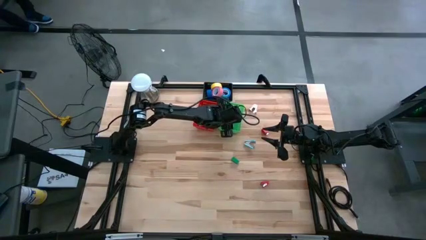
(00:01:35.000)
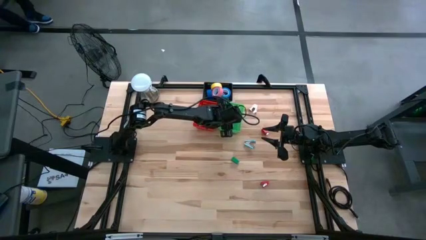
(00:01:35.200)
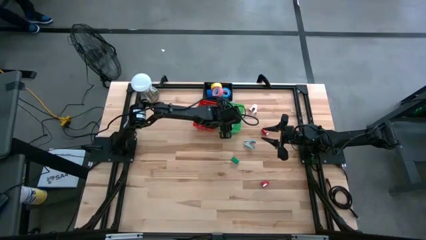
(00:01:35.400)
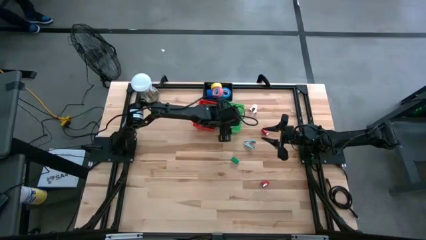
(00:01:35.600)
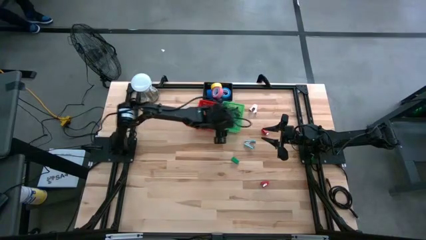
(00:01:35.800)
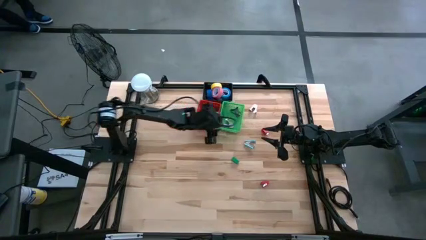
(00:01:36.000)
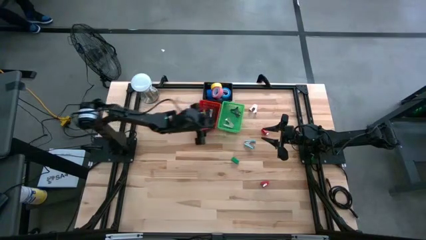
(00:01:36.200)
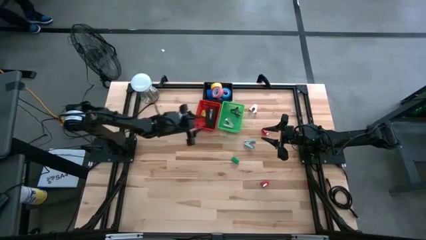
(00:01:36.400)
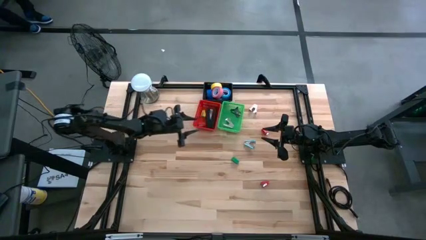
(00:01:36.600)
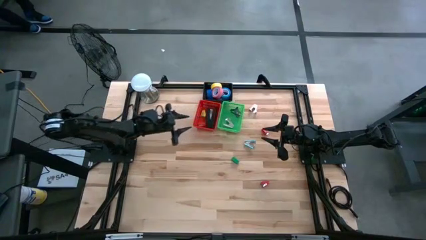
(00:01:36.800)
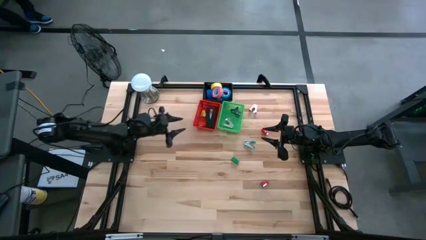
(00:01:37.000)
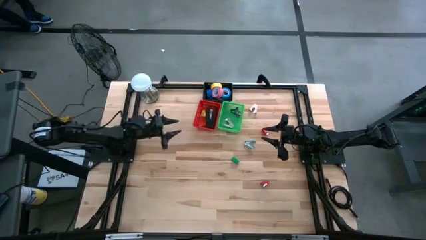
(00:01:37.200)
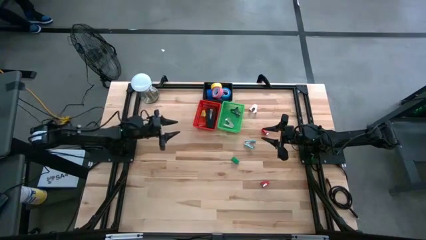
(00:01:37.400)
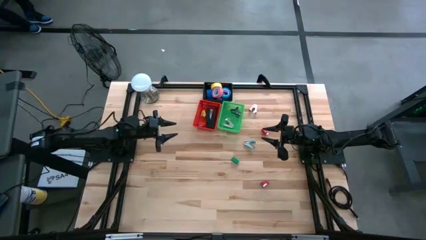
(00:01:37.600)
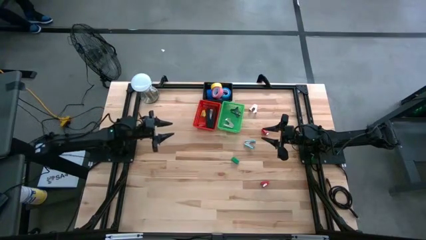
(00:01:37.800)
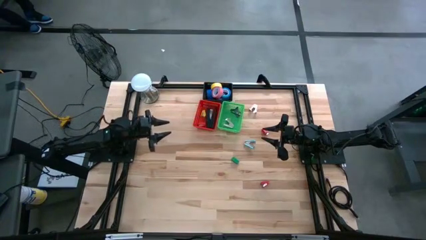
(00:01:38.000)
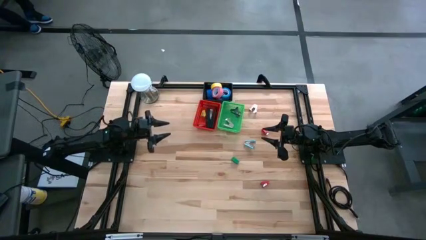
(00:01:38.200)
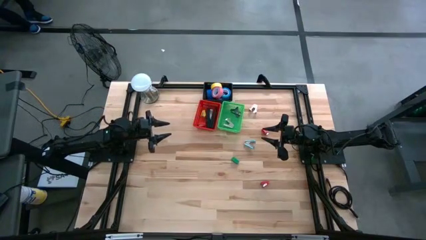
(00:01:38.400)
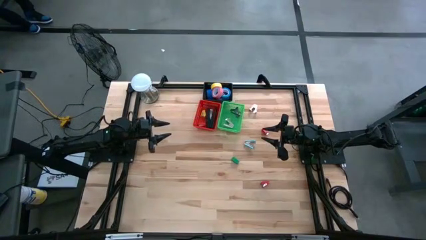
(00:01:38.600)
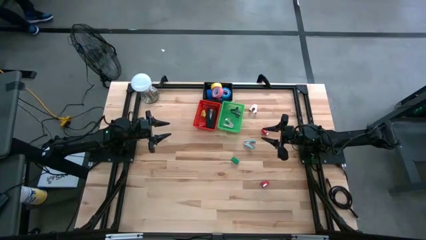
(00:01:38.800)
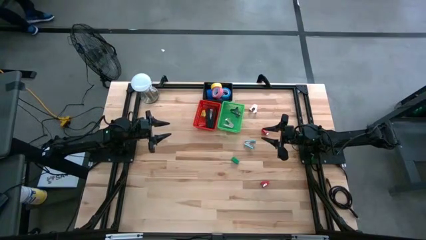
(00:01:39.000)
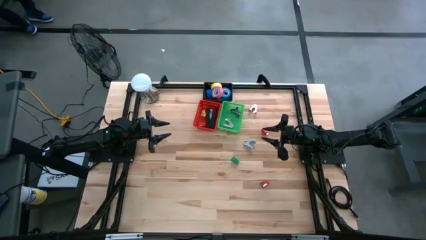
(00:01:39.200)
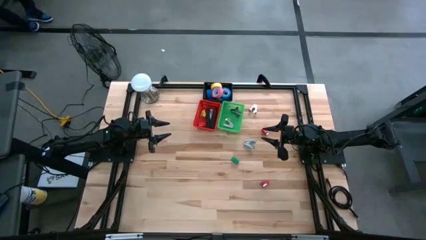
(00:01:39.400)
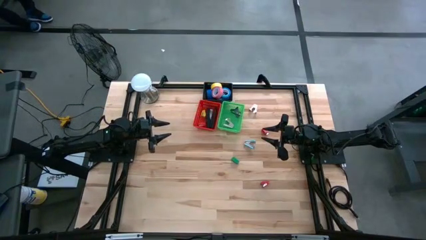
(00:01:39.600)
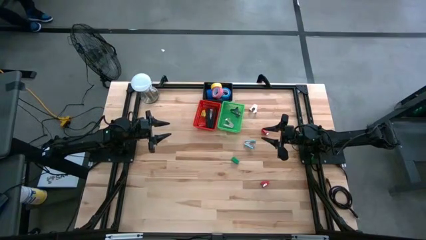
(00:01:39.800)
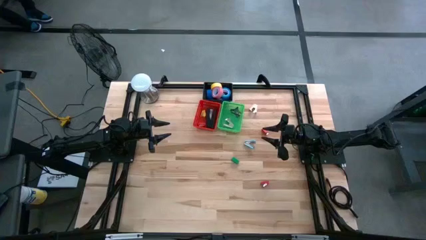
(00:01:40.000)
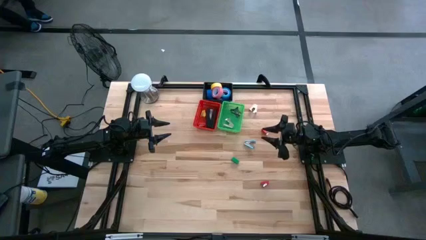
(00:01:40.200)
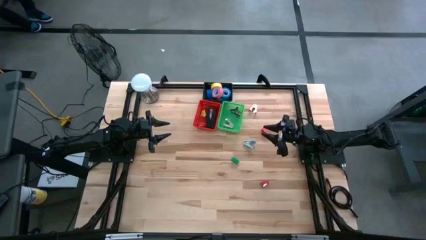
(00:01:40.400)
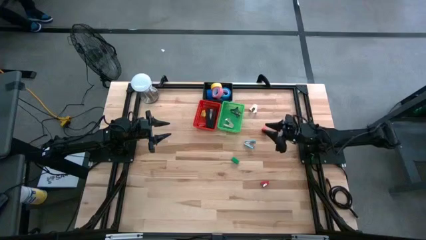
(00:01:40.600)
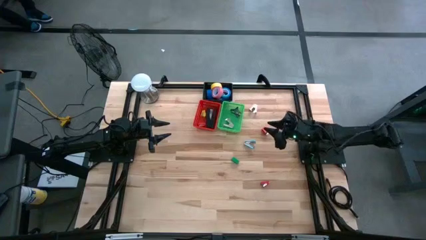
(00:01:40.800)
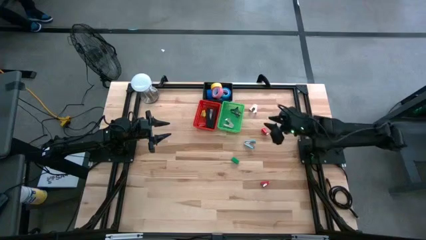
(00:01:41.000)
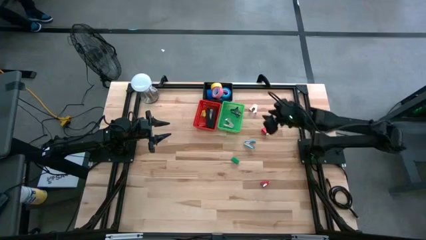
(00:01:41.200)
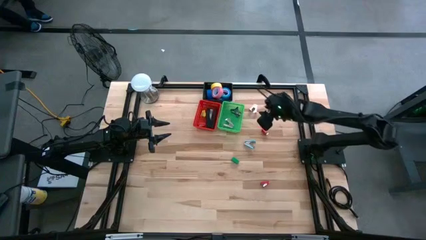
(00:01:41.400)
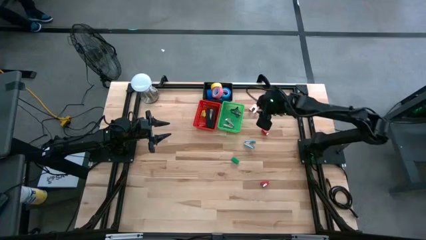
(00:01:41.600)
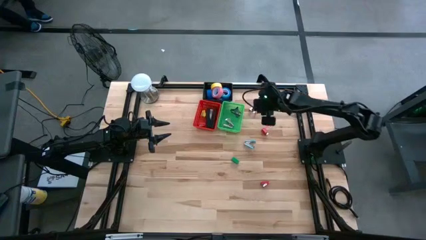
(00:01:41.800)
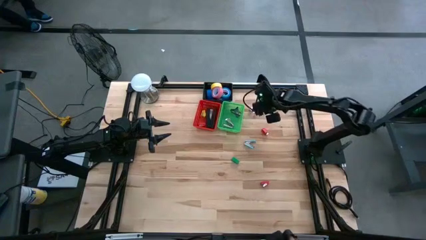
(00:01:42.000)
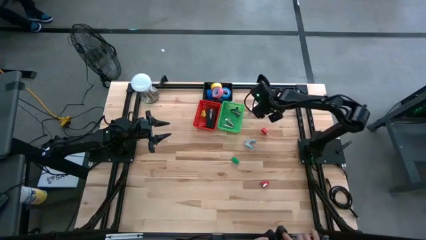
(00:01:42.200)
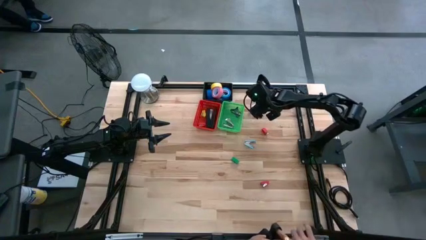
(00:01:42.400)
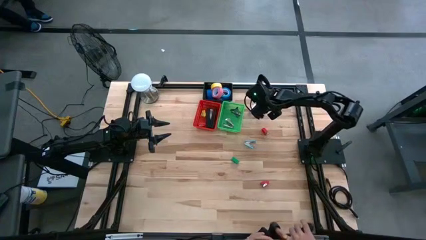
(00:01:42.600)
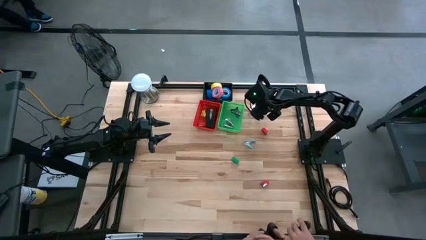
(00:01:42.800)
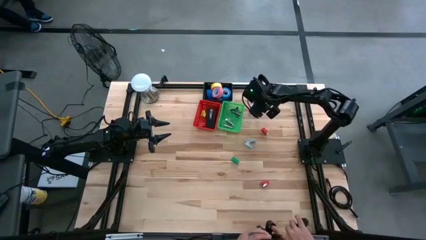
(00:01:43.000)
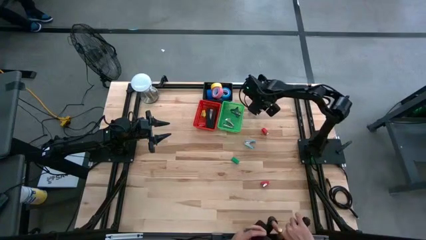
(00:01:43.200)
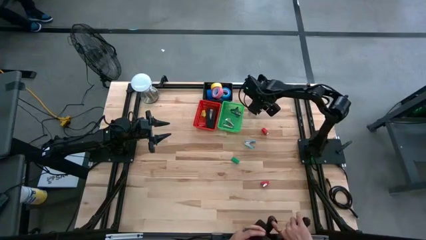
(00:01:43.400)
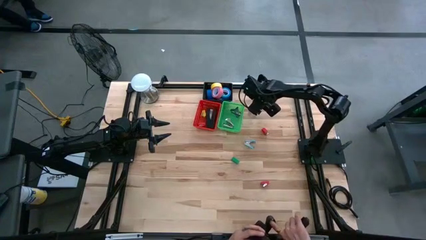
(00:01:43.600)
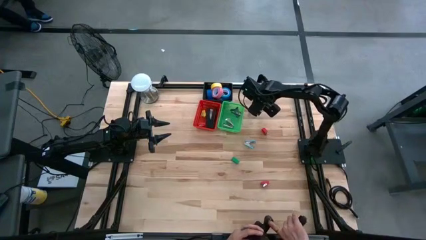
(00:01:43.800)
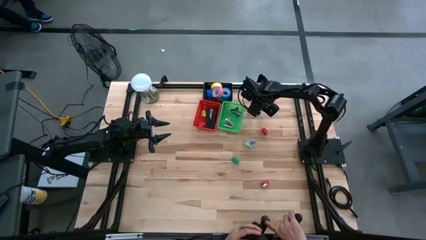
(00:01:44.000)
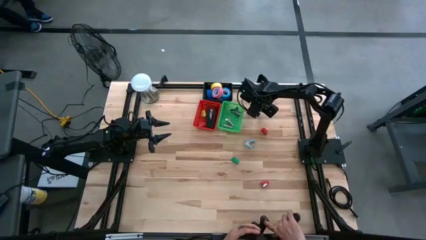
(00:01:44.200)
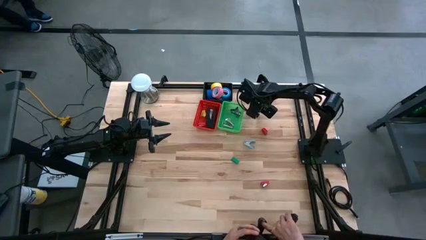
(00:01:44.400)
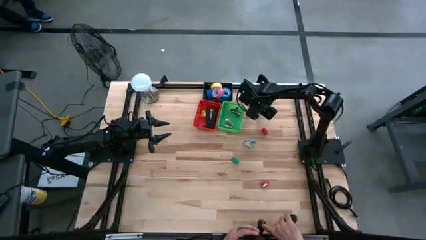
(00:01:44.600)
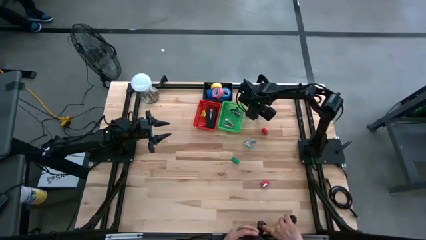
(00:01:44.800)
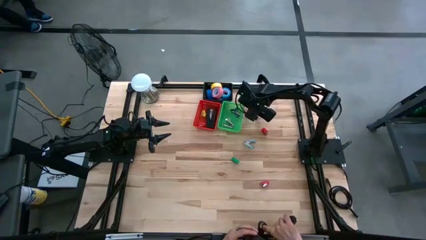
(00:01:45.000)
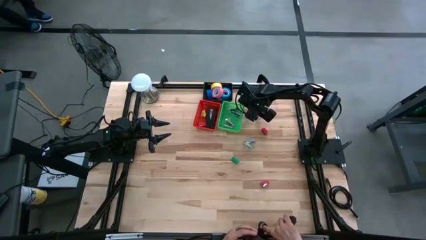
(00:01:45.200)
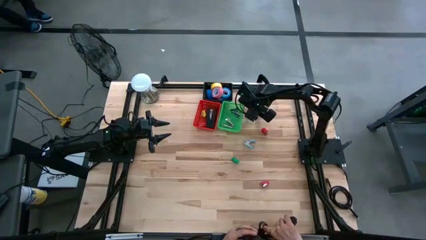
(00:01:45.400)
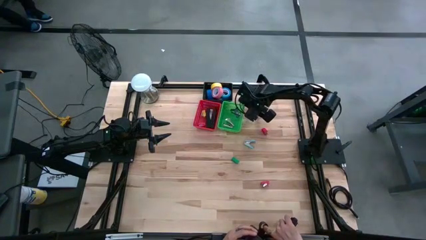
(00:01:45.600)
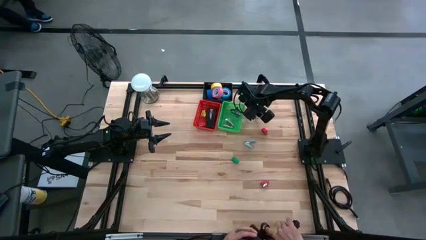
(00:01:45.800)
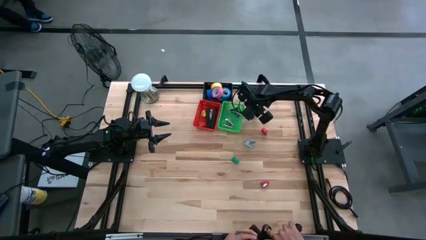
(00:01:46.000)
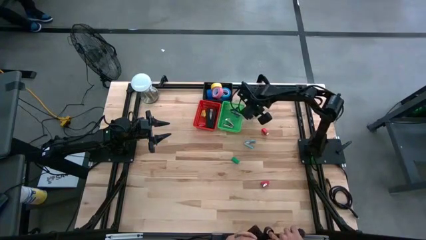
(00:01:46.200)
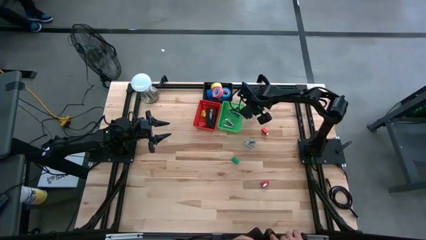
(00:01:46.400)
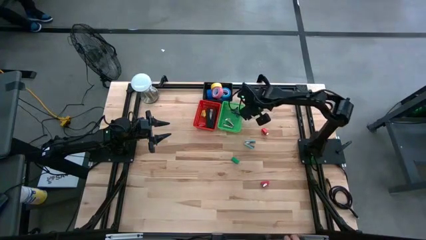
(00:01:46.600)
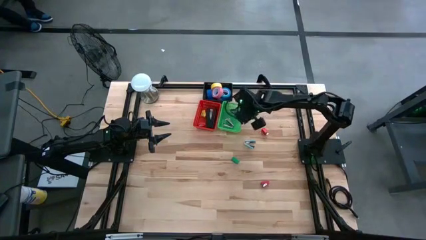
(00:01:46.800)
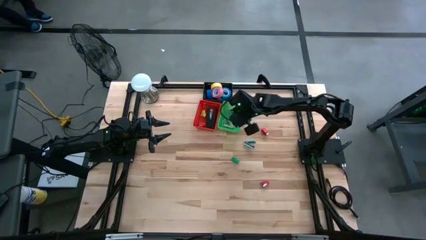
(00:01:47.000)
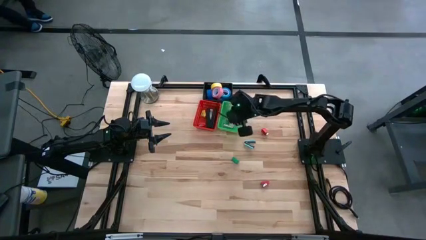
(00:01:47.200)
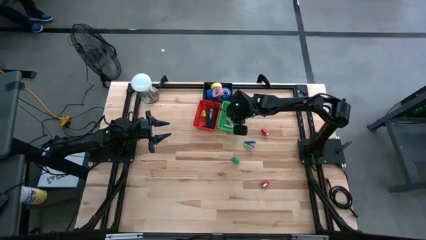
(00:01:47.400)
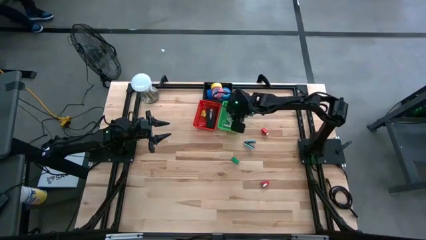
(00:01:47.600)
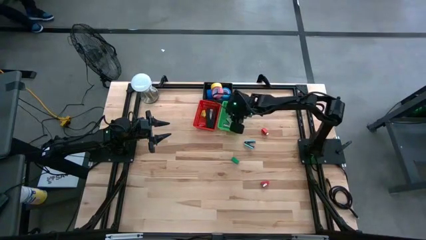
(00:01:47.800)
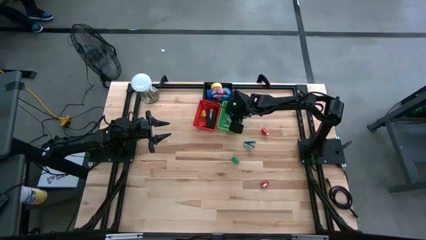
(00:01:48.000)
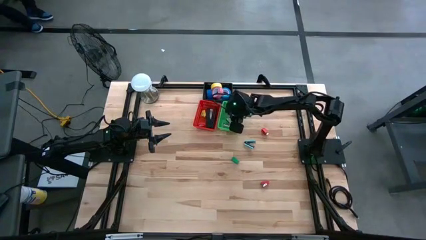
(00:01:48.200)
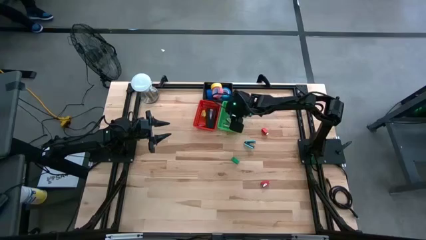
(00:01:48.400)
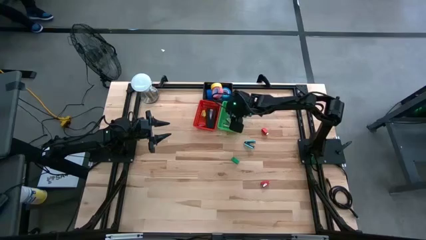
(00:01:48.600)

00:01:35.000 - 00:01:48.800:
Task: Pick and place Stapler, Stapler remover, tape
Put the pink staple remover into the green bin
